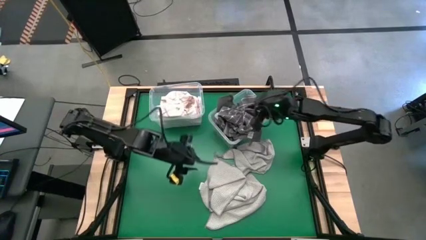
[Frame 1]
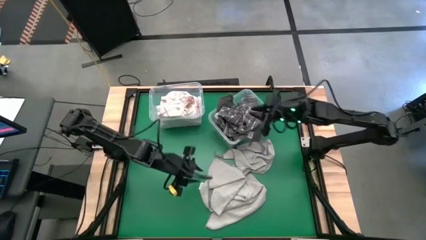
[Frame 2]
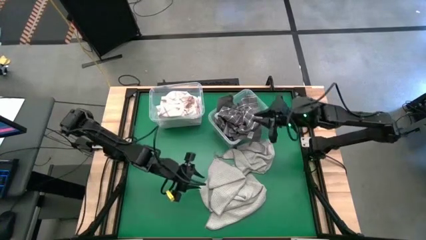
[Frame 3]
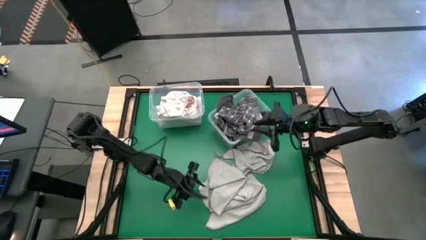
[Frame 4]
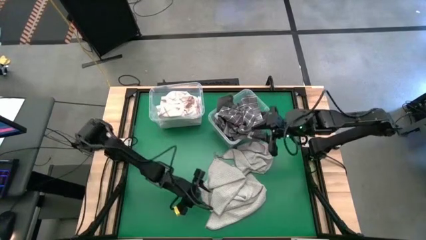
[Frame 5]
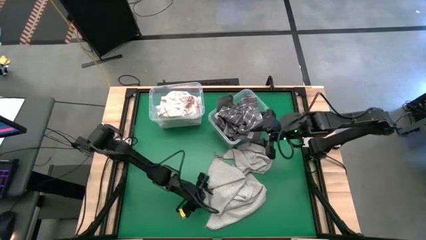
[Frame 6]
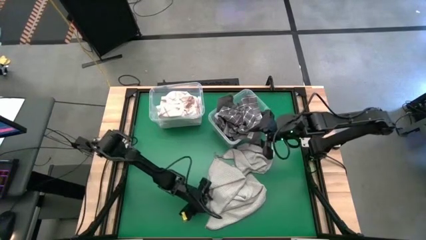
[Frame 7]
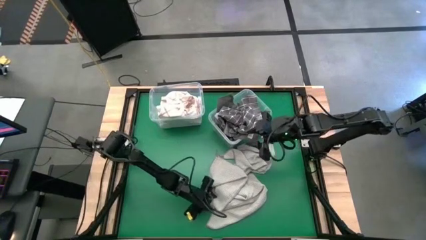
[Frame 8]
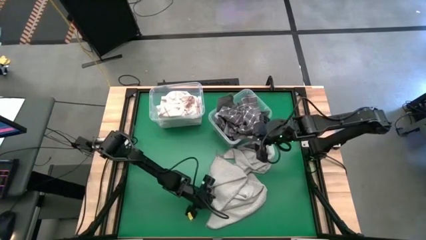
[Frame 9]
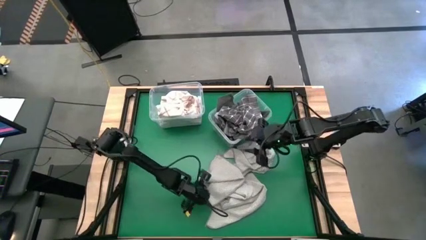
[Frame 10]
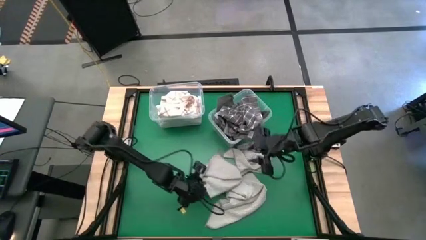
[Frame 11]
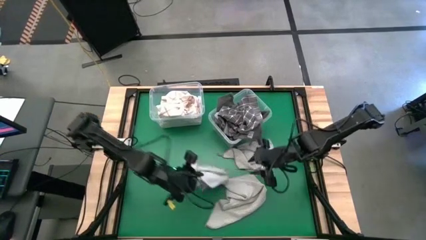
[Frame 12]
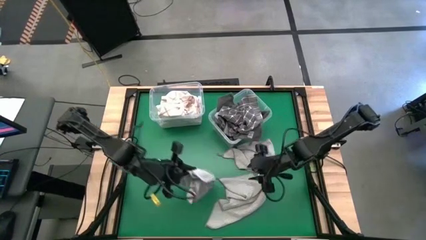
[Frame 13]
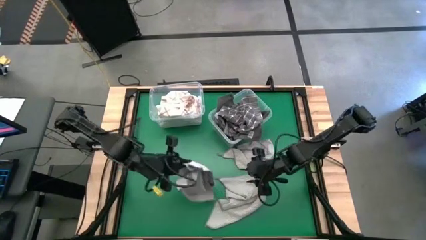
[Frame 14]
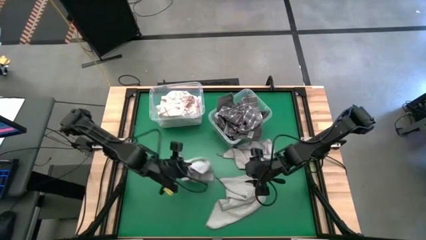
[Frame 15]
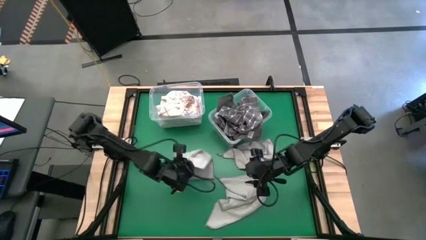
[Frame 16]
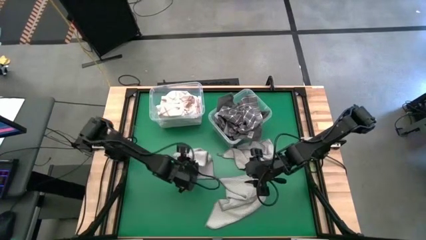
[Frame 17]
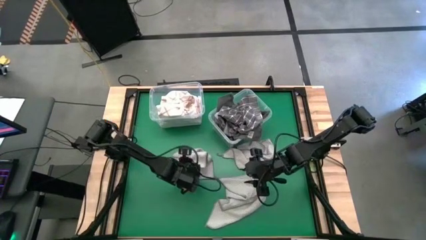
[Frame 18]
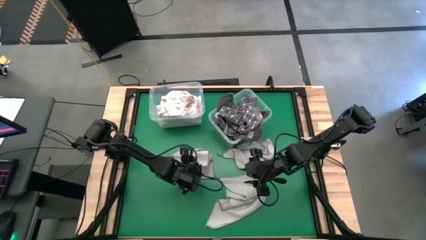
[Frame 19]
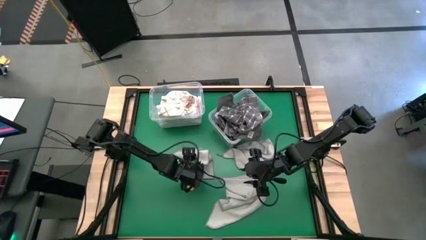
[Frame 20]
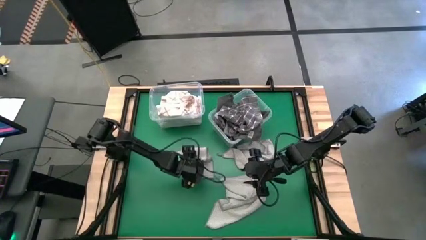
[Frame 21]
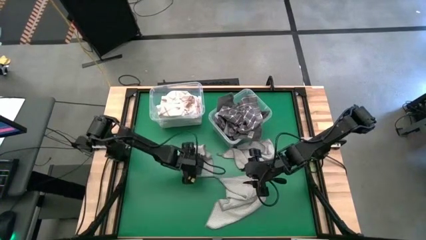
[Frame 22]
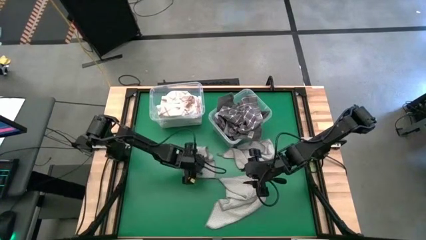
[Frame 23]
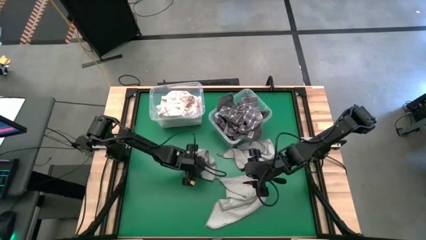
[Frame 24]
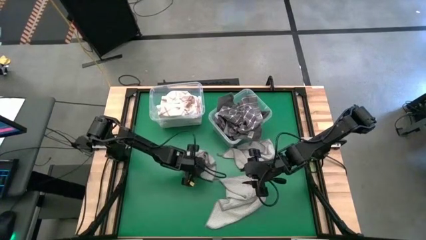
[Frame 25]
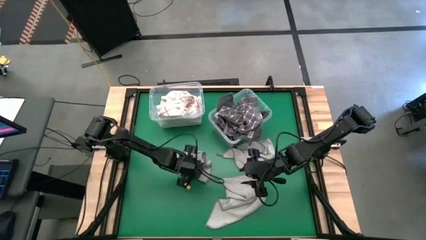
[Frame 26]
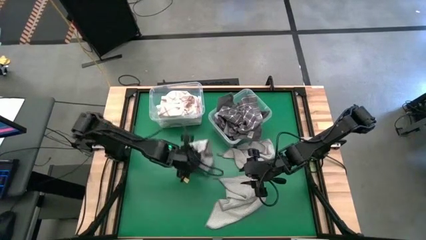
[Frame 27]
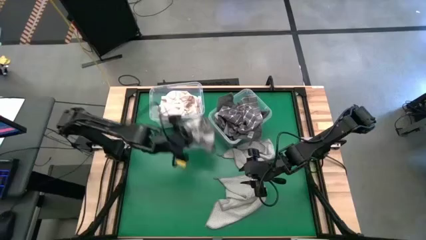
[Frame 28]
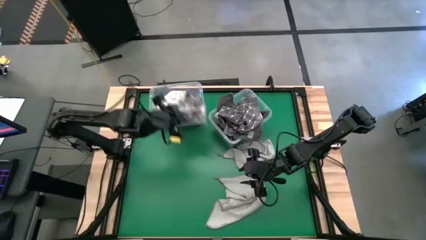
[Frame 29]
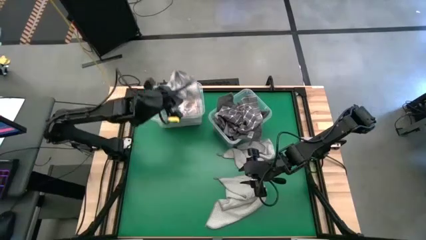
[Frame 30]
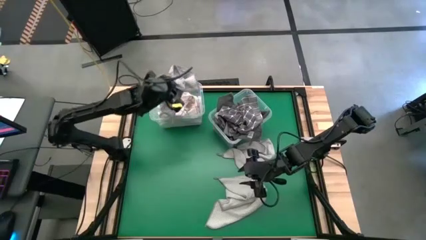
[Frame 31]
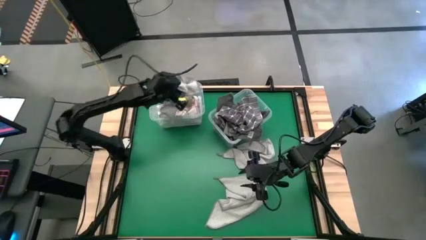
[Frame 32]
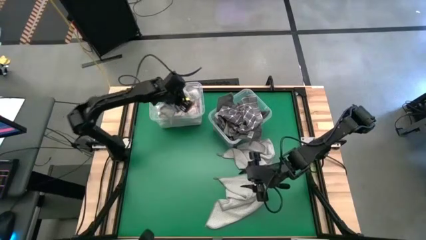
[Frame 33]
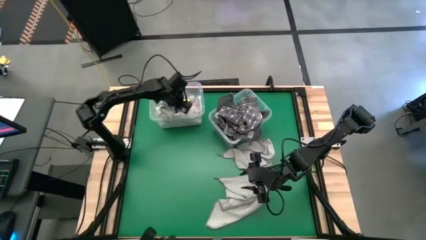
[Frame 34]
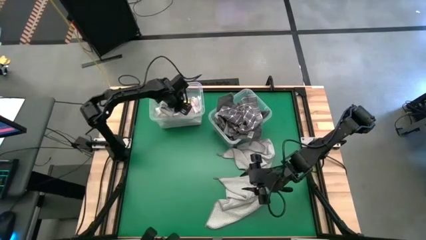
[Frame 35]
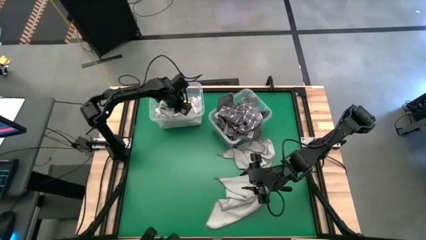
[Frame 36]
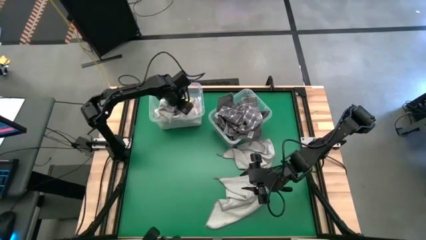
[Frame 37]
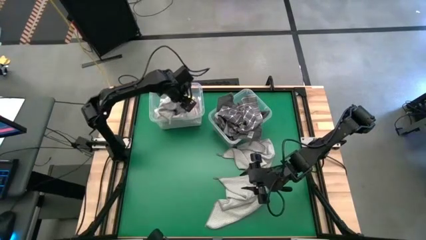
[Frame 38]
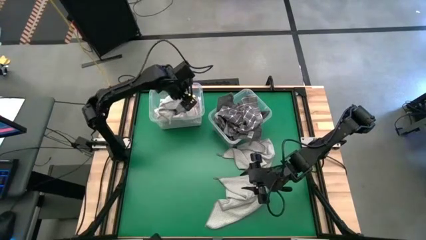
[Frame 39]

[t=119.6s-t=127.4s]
Task: Sort towels by color in basket
Put the middle light gray towel into the left transparent bin

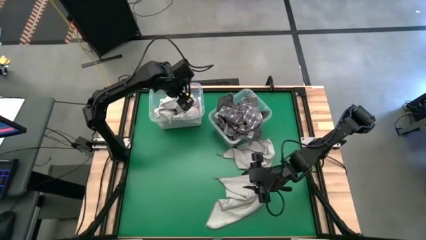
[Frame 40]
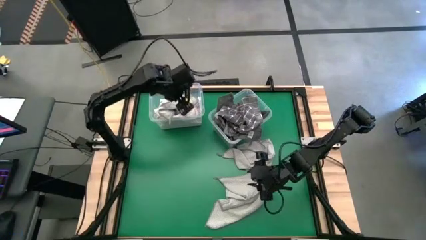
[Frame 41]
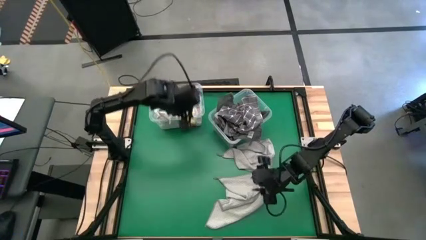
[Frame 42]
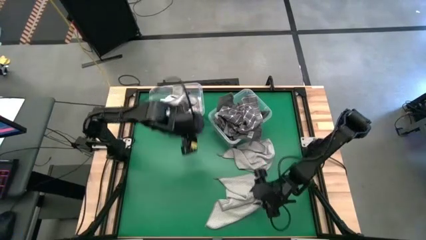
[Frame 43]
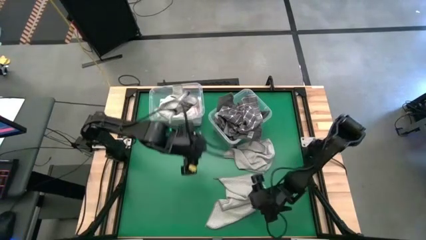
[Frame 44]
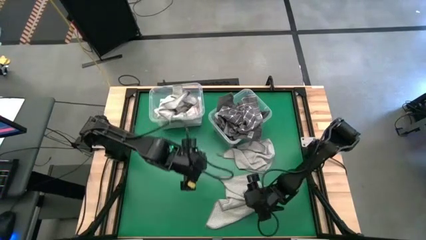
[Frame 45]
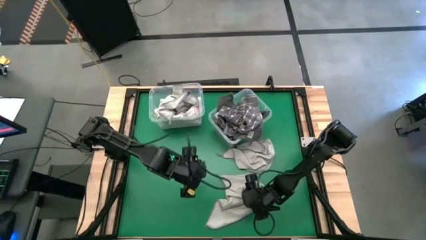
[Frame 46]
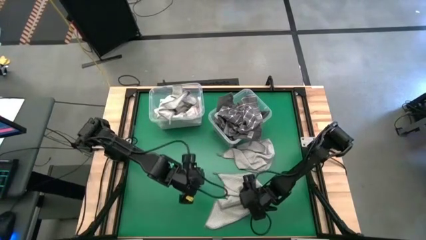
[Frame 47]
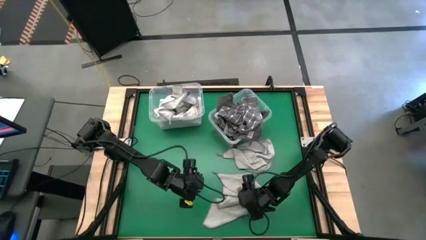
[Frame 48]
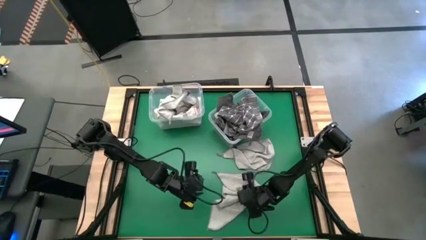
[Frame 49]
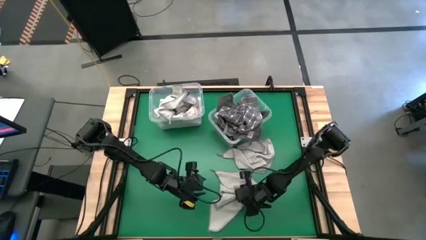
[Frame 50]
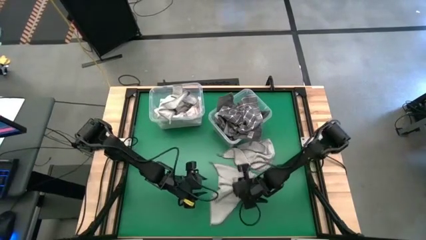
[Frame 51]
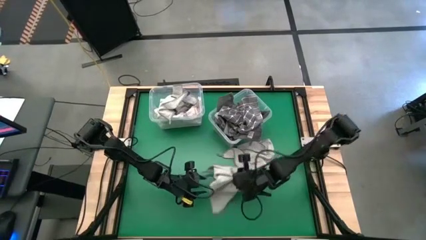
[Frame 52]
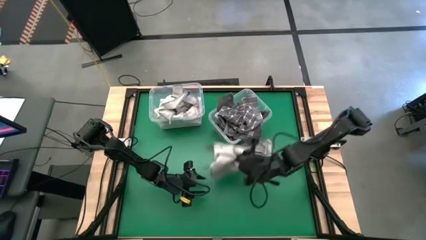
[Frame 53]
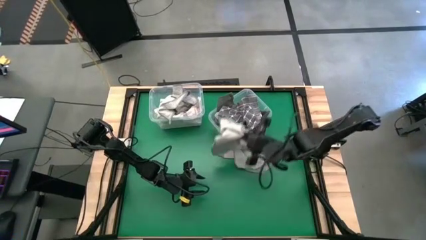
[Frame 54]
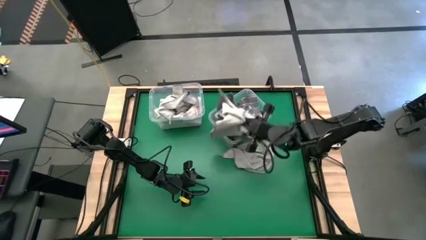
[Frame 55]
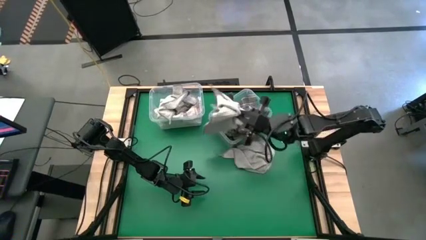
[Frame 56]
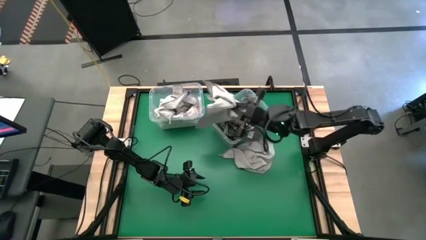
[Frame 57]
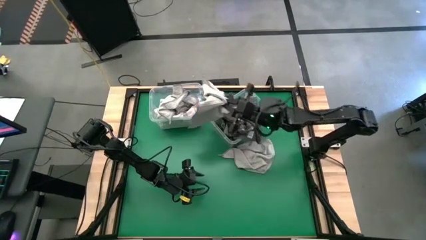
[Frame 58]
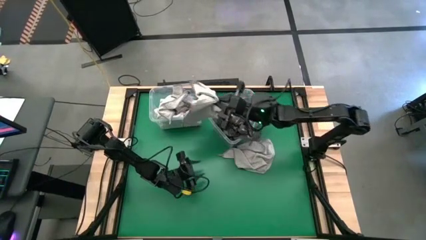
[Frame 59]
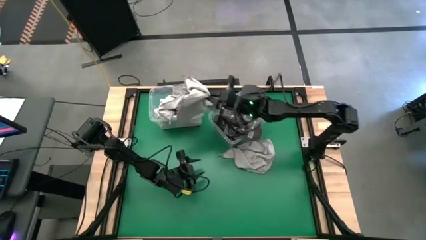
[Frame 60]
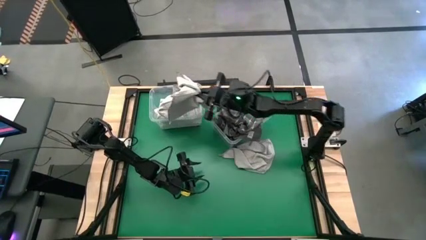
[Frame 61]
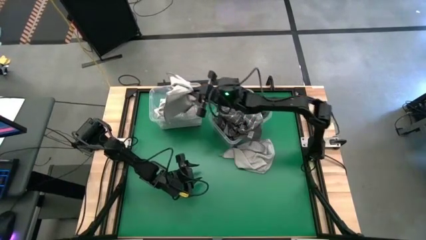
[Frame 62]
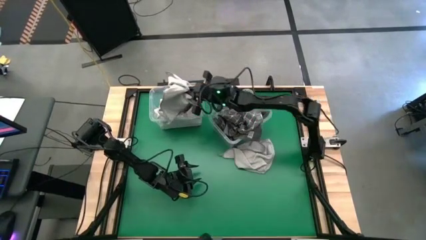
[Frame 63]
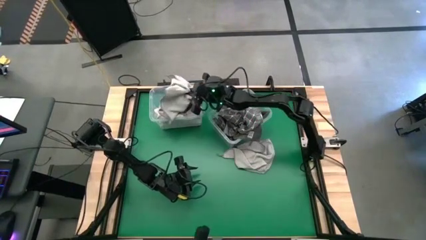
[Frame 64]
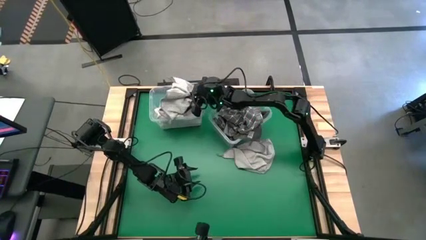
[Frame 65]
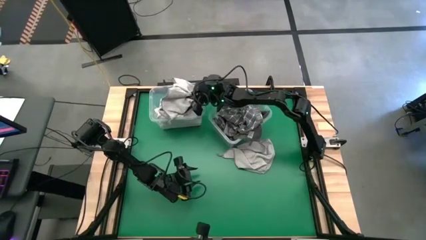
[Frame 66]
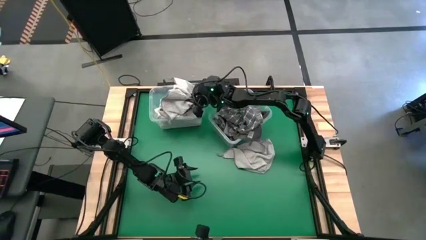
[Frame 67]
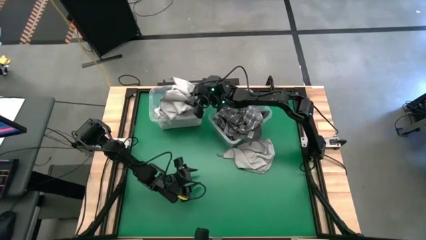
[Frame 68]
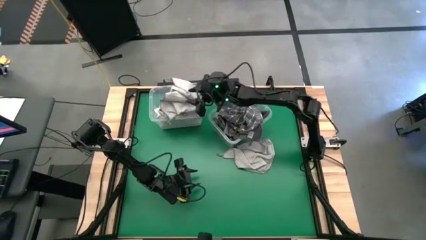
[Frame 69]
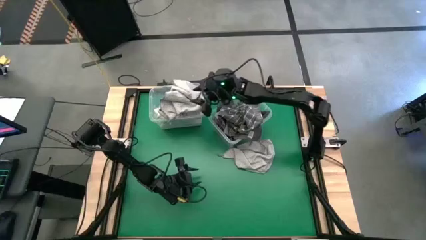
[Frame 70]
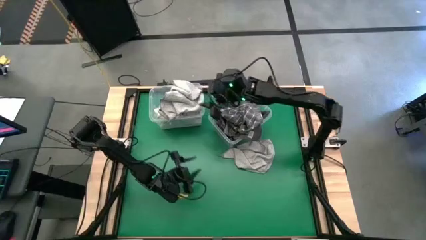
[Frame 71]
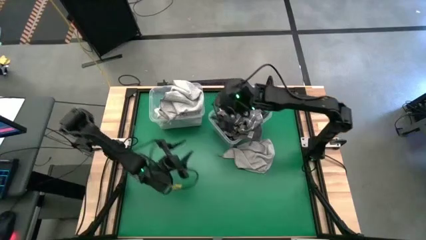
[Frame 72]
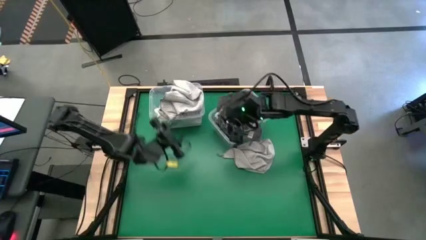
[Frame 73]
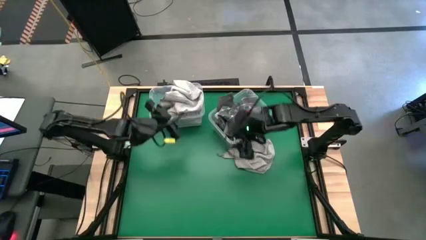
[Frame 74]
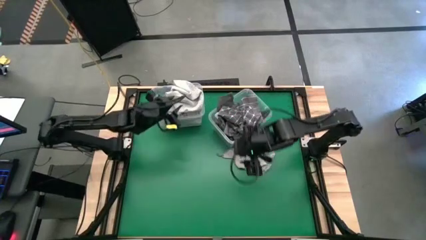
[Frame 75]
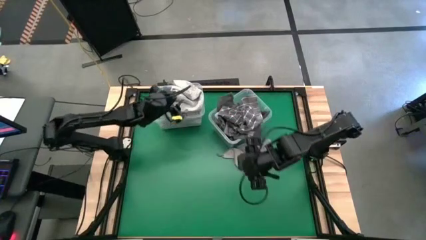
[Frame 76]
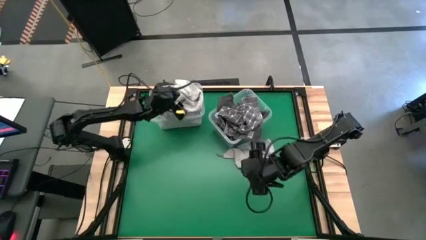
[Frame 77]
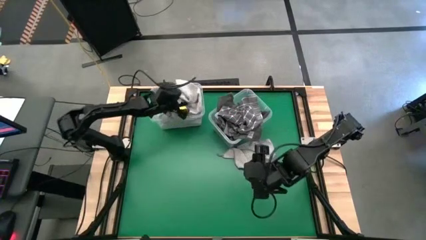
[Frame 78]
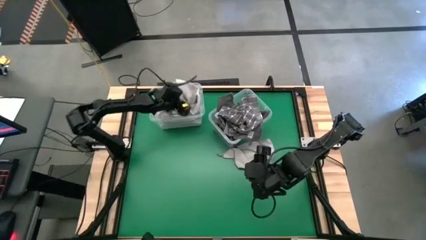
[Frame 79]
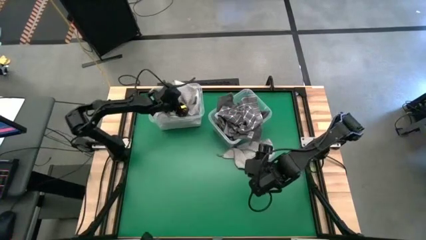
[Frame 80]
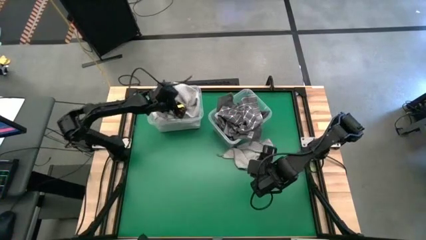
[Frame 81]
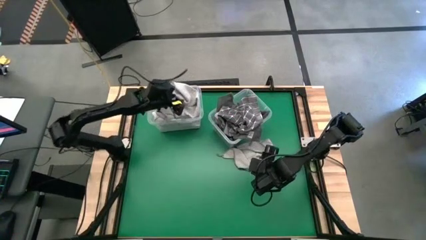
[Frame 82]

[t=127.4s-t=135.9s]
Put the bottom light gray towel into the left transparent bin
